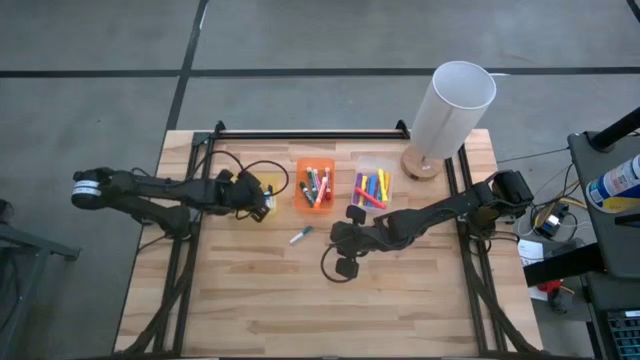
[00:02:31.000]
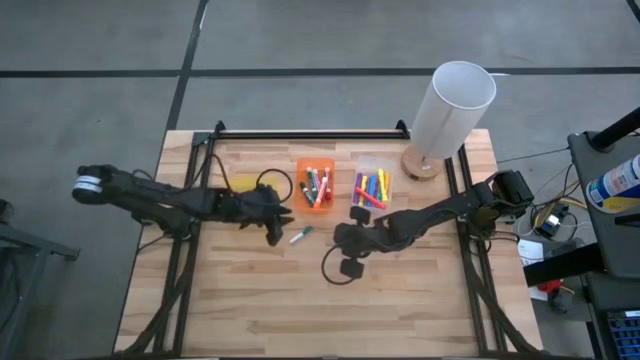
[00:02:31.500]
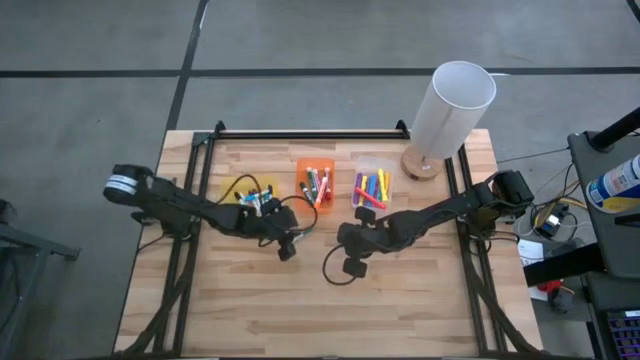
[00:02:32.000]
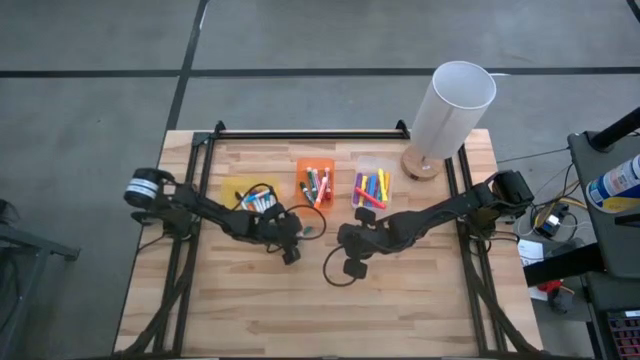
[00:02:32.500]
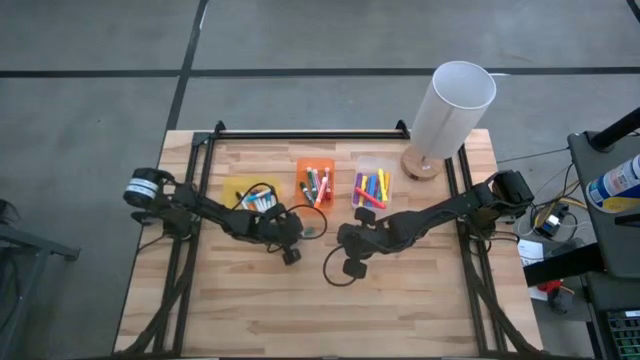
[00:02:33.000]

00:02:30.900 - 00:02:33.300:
Task: Pick & Place Markers
Put the small green marker into the yellow bin

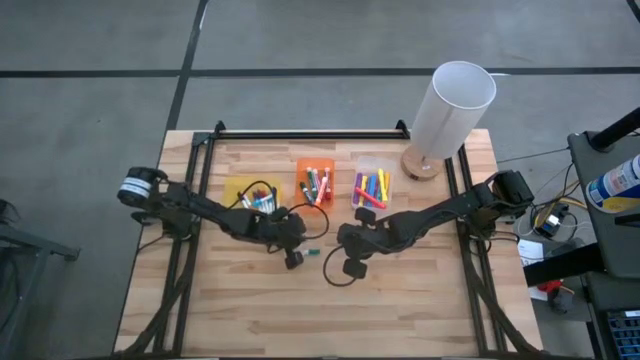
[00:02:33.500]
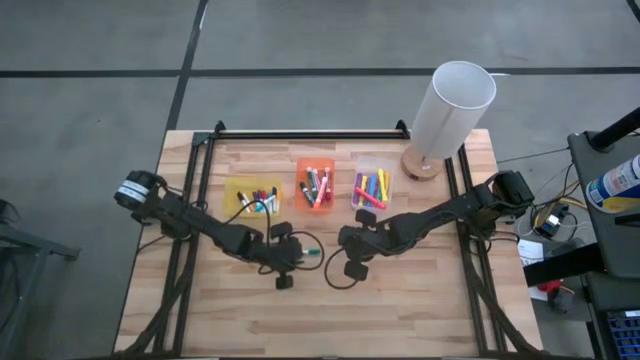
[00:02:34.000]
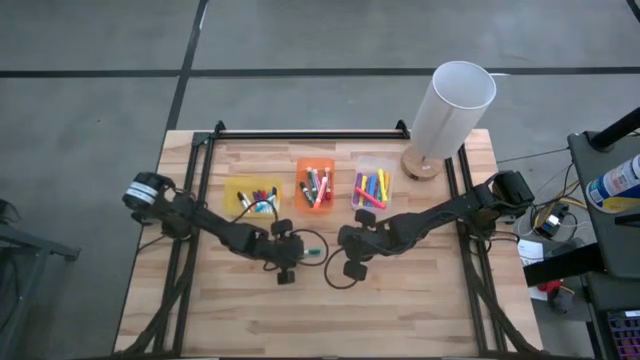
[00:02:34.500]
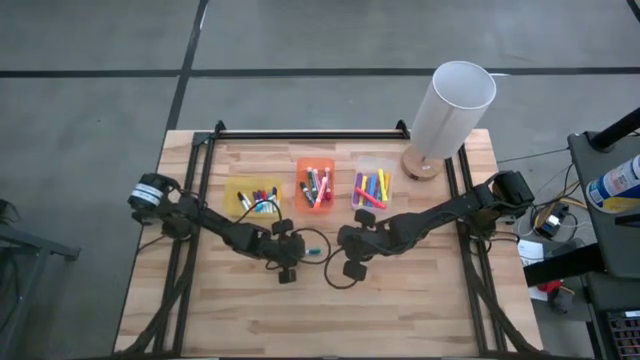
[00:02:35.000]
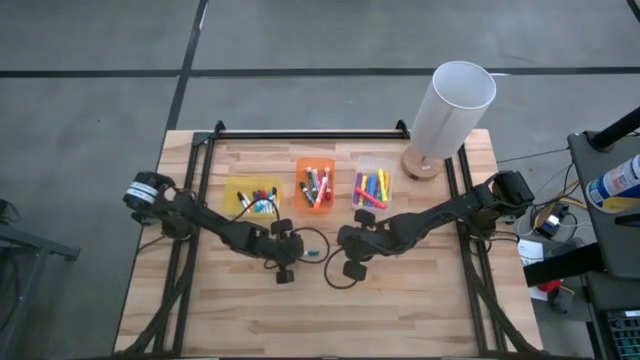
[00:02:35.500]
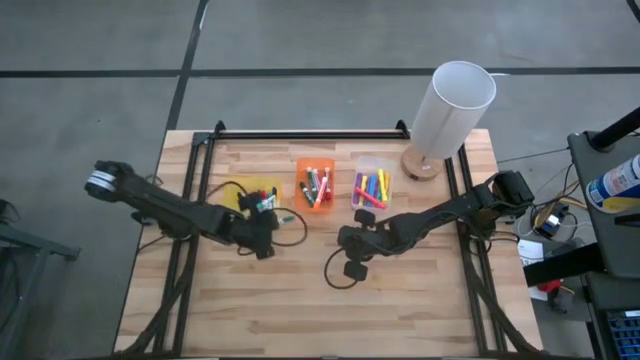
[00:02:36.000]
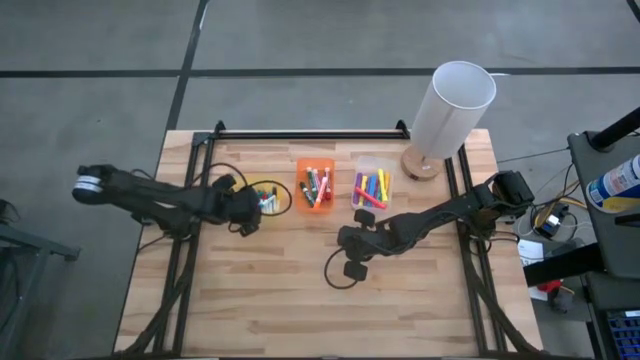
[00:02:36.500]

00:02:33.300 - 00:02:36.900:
Put the small green marker into the yellow bin

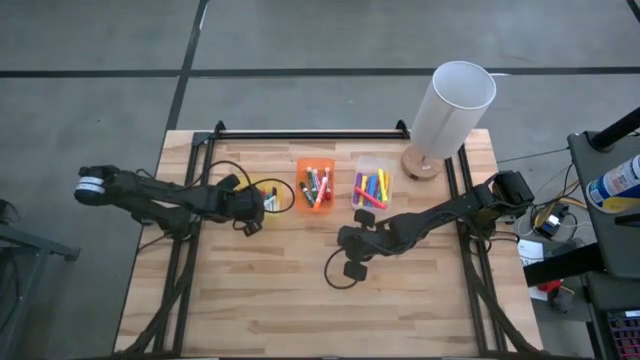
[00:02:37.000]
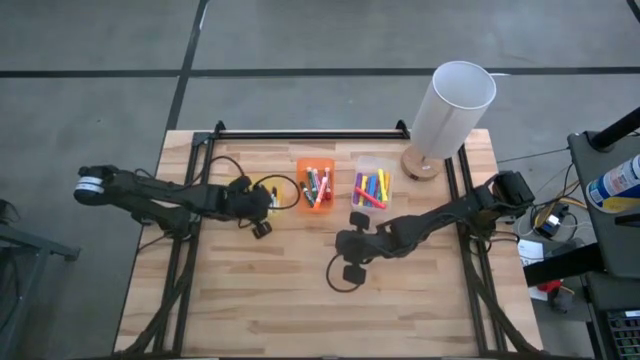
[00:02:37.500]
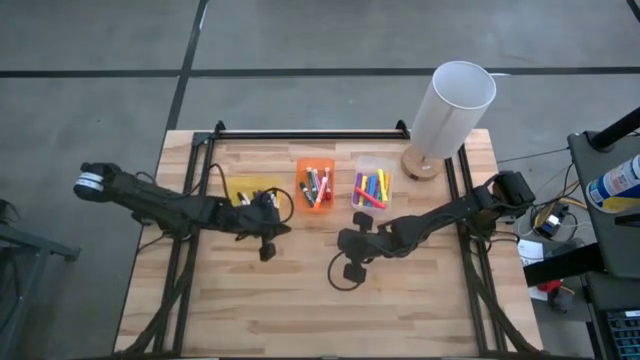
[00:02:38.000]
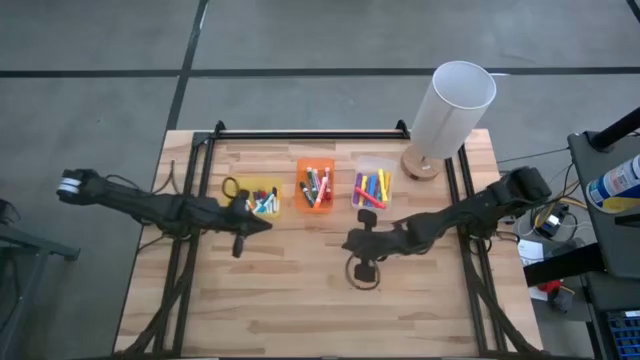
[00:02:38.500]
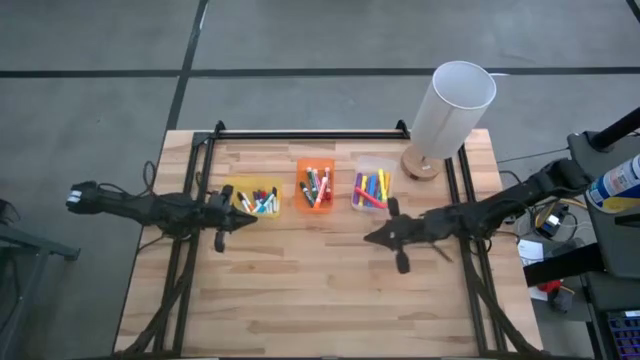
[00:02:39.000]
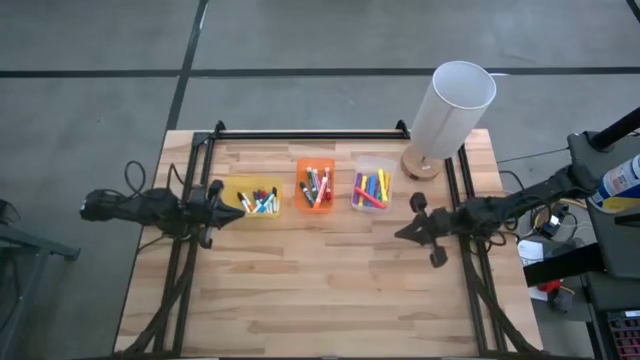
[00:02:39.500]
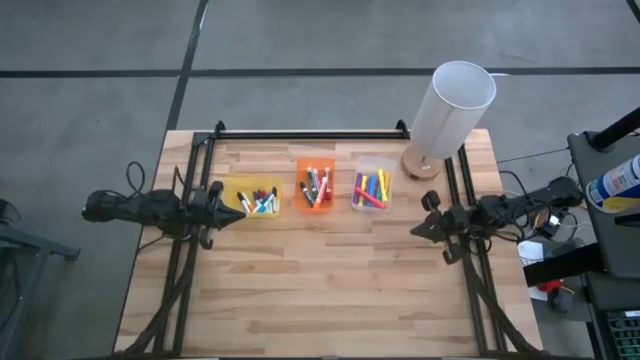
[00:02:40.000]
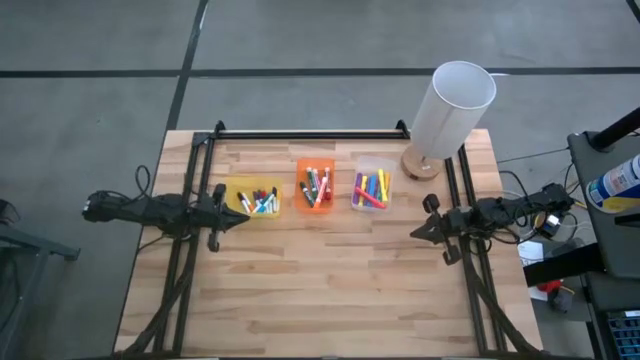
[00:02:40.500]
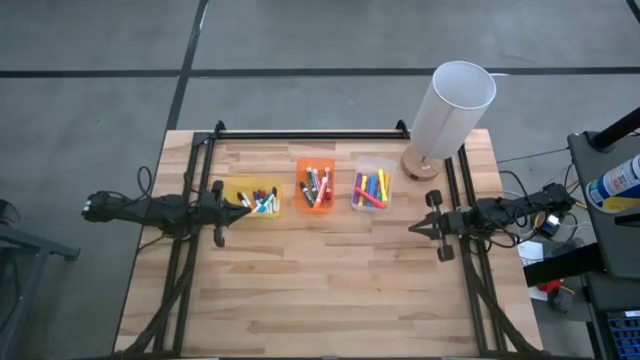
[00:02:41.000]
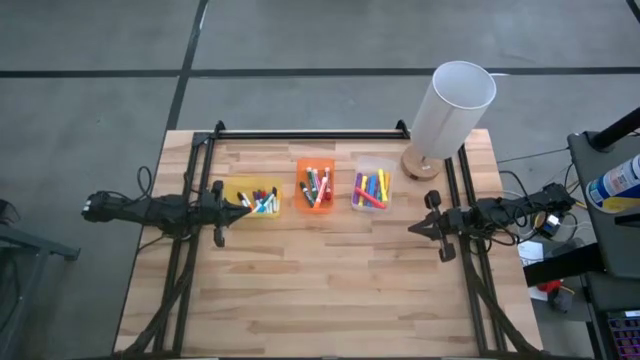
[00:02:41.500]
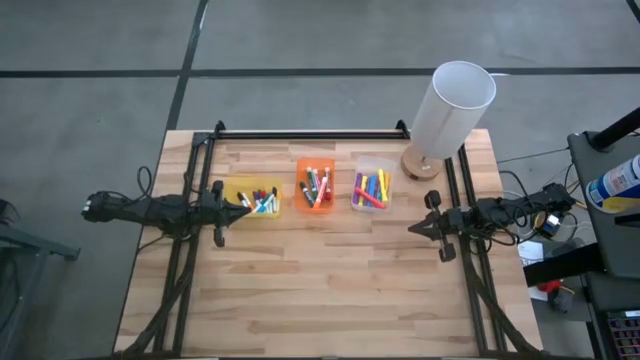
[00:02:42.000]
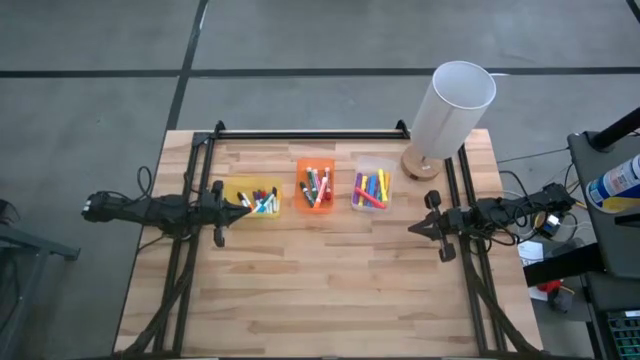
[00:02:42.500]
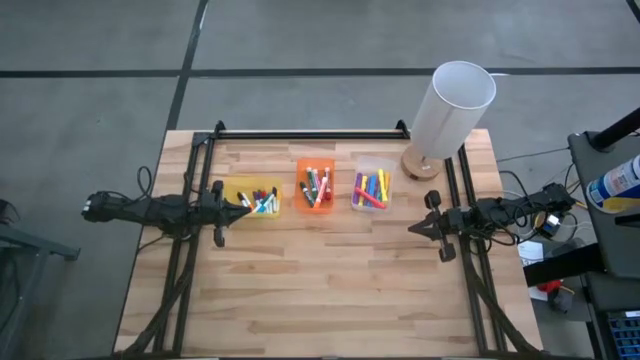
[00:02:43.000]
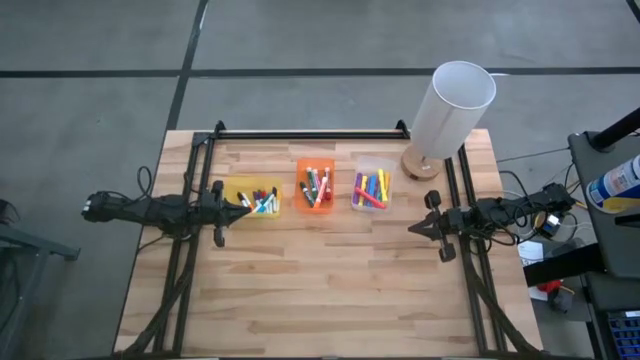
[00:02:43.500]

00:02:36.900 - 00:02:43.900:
Return to Home Position

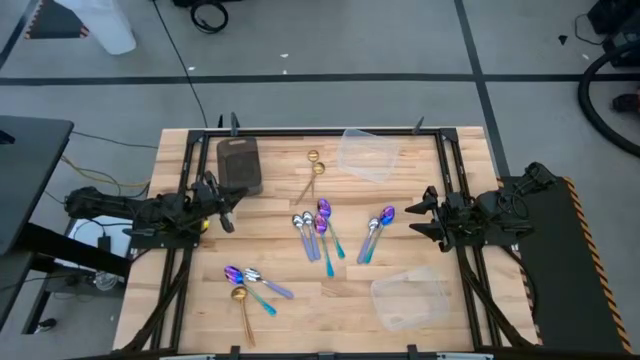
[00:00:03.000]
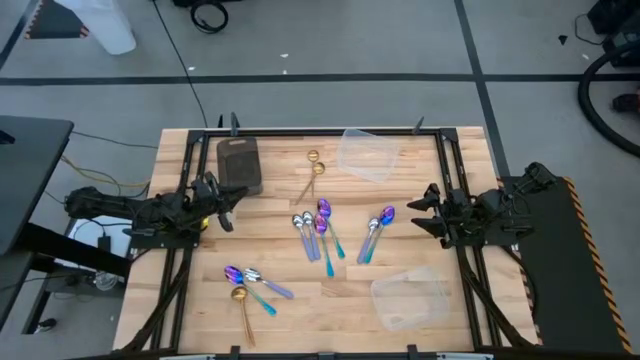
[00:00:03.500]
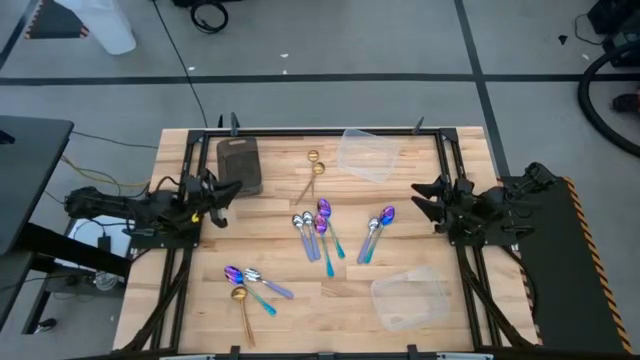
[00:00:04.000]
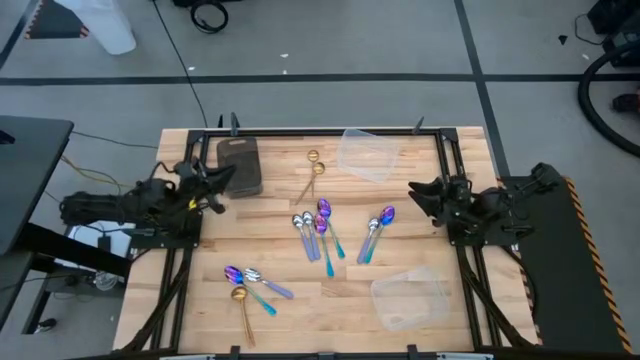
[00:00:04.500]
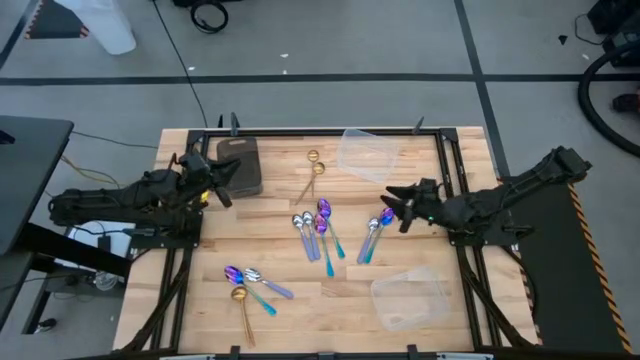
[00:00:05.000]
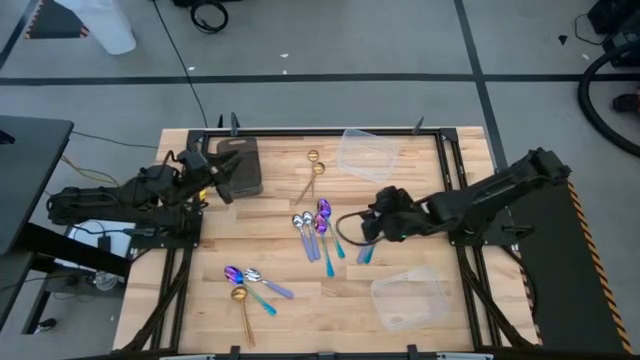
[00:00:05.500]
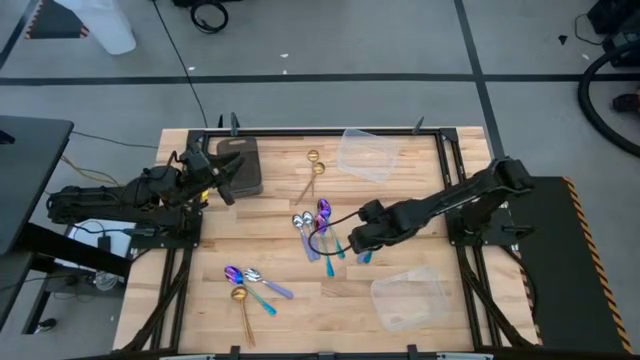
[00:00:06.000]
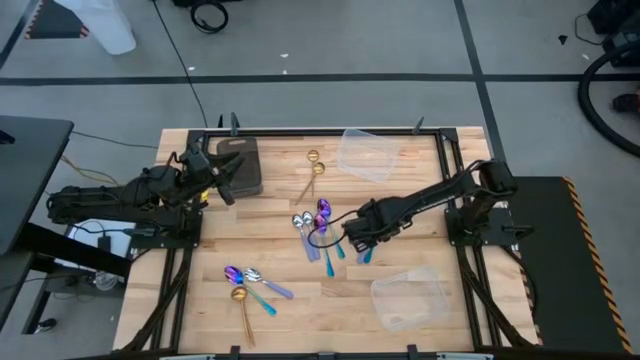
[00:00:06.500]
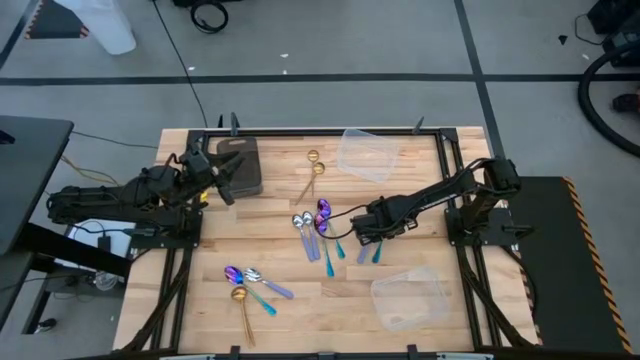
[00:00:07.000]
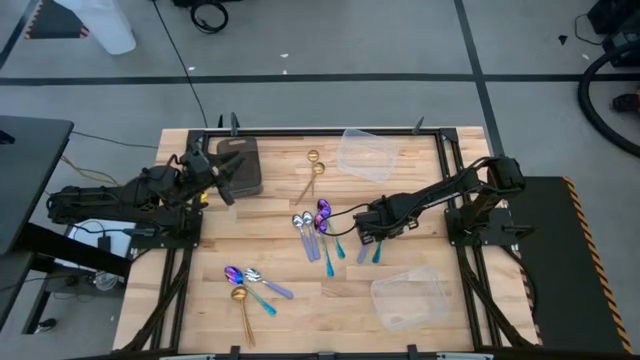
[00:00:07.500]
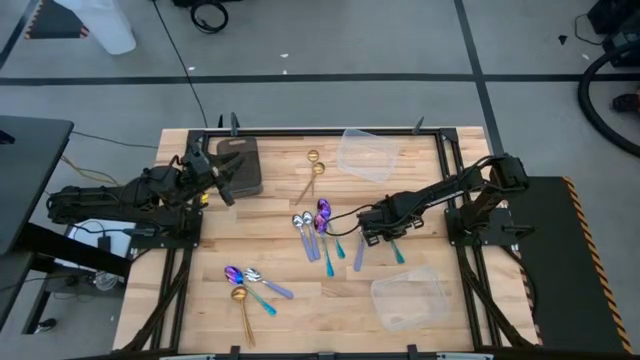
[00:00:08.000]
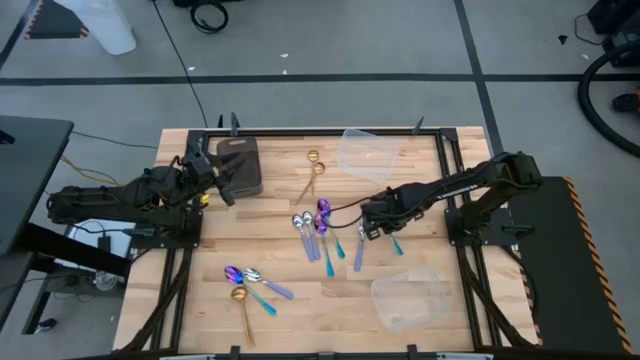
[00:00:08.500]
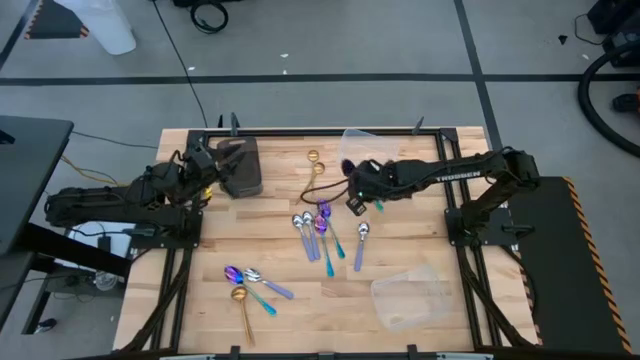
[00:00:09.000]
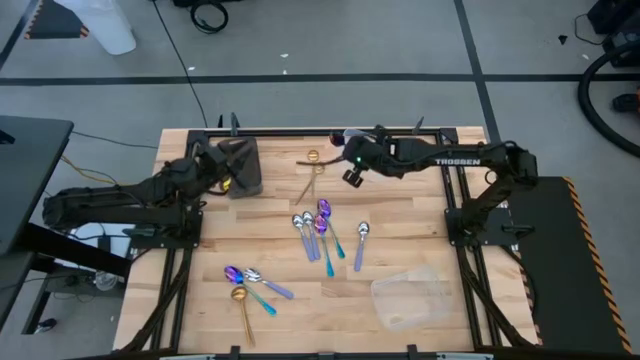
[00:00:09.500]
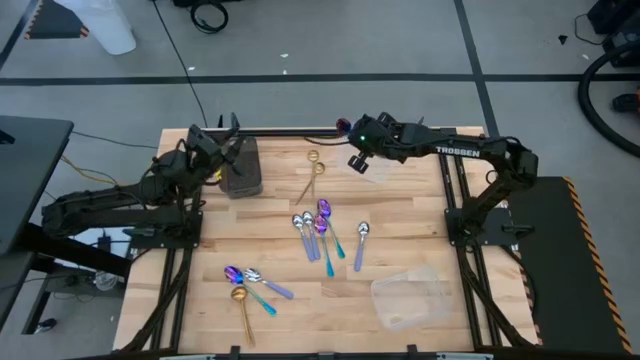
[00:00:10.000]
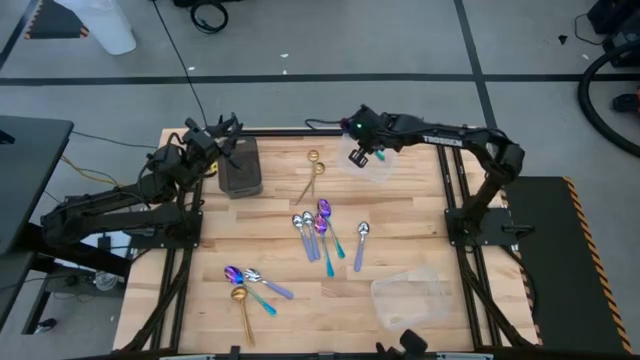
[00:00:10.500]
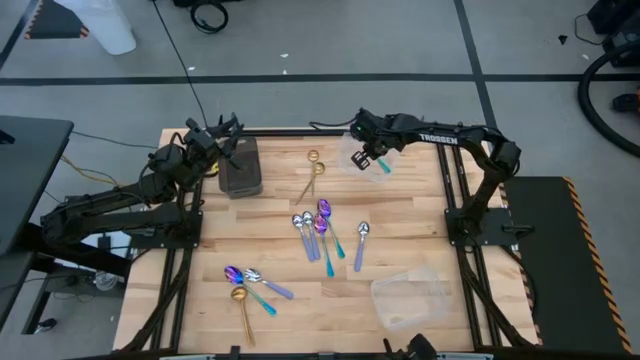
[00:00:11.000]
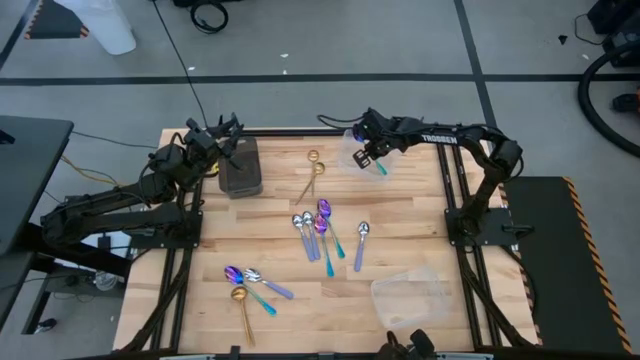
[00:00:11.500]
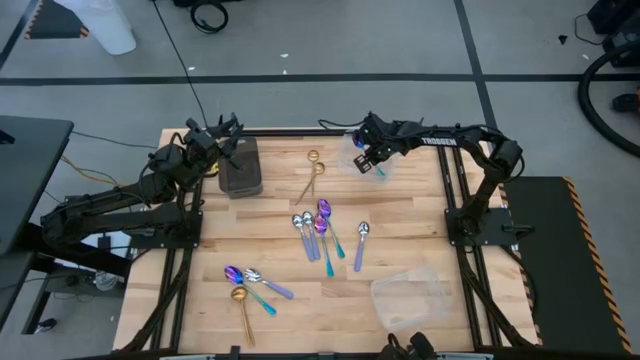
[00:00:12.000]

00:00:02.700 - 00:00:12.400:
Task: Sort silverware by color (type)
Put the blue spoon into the top transparent bin
